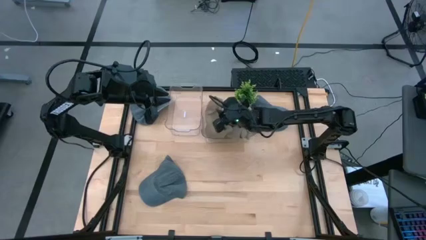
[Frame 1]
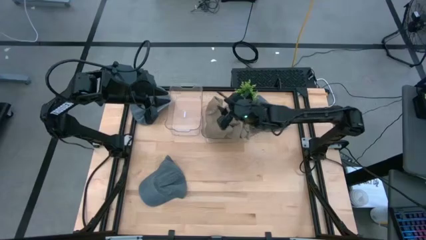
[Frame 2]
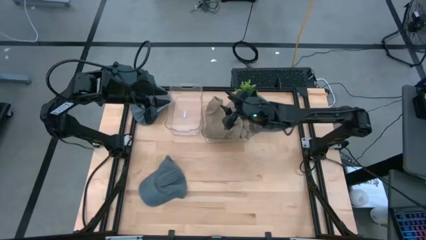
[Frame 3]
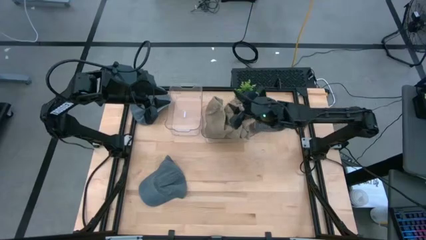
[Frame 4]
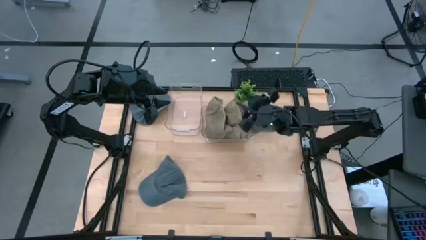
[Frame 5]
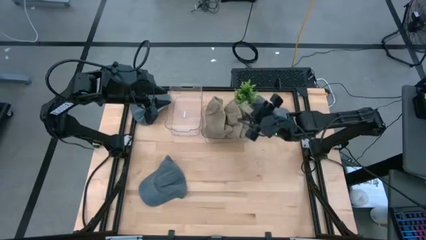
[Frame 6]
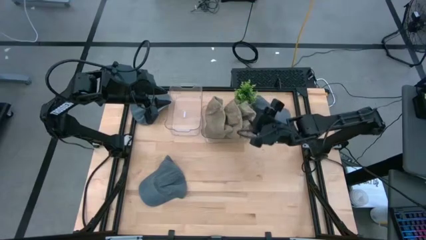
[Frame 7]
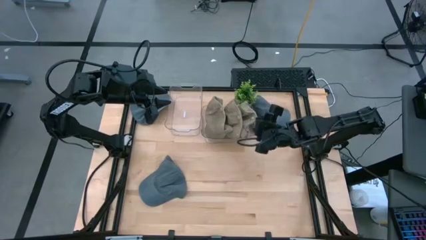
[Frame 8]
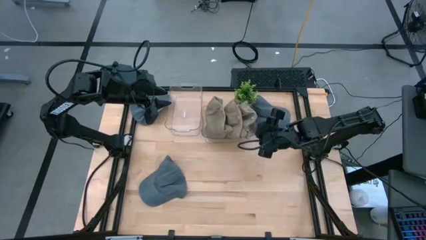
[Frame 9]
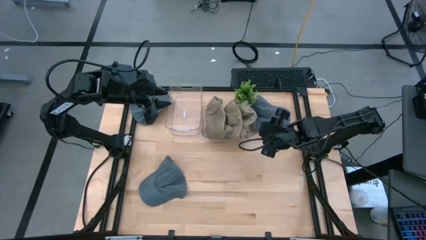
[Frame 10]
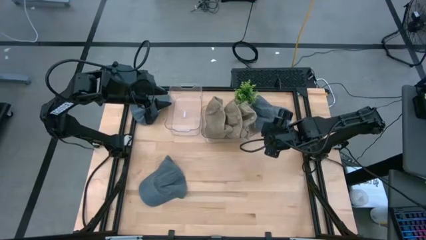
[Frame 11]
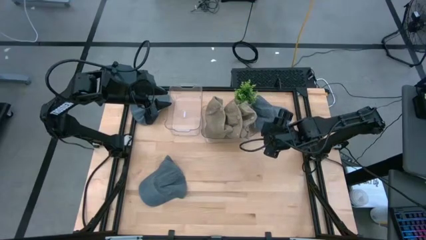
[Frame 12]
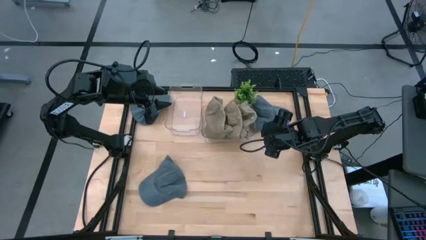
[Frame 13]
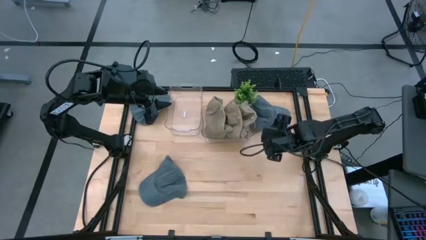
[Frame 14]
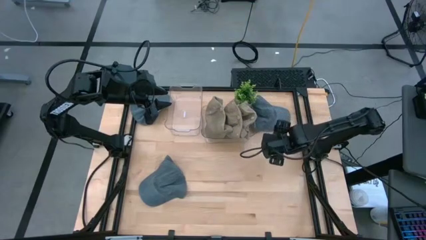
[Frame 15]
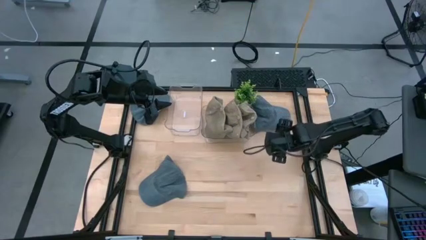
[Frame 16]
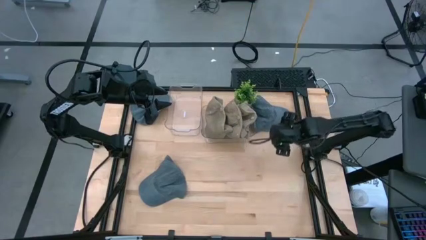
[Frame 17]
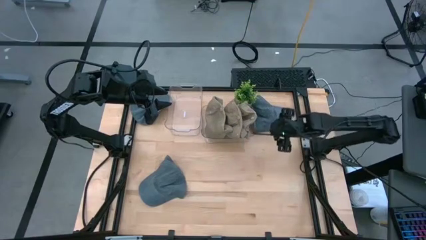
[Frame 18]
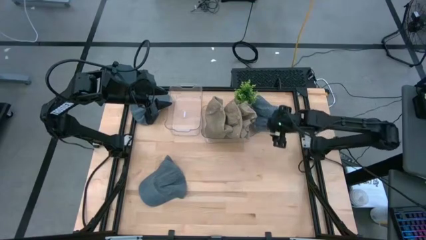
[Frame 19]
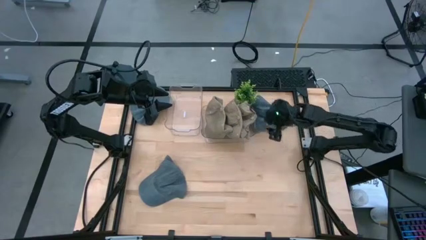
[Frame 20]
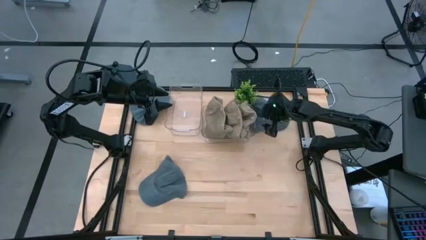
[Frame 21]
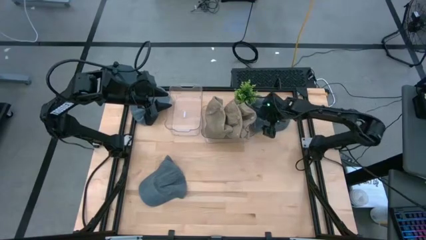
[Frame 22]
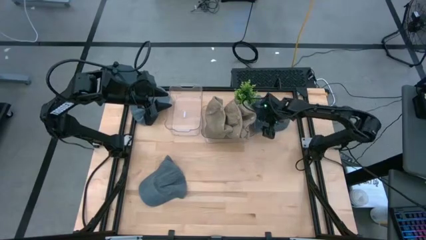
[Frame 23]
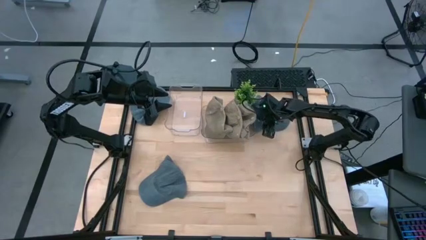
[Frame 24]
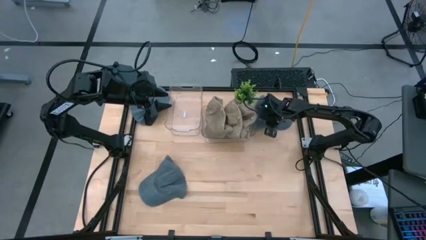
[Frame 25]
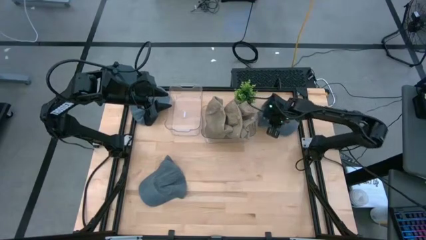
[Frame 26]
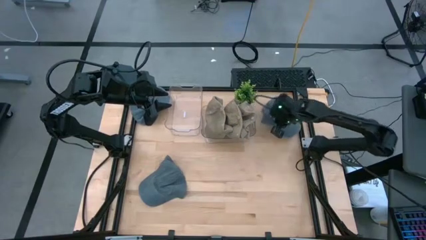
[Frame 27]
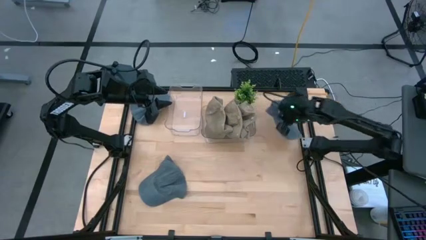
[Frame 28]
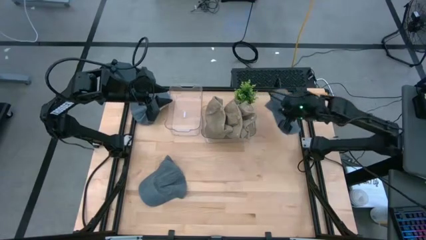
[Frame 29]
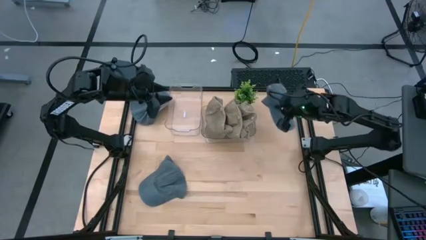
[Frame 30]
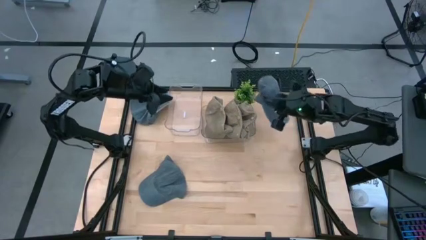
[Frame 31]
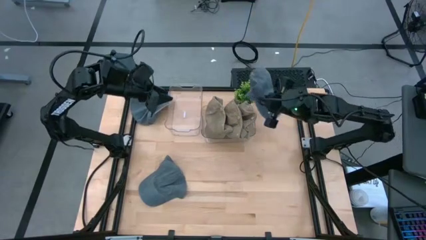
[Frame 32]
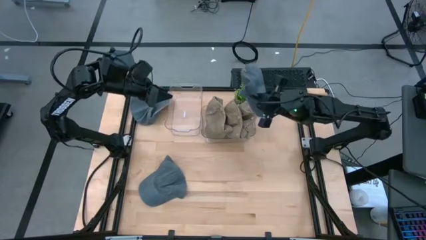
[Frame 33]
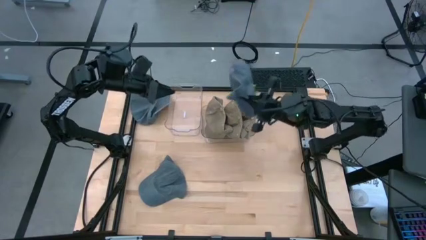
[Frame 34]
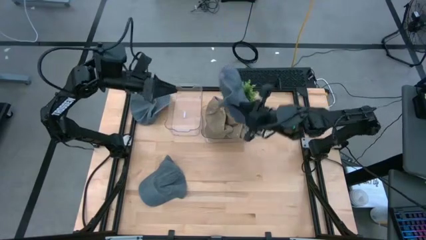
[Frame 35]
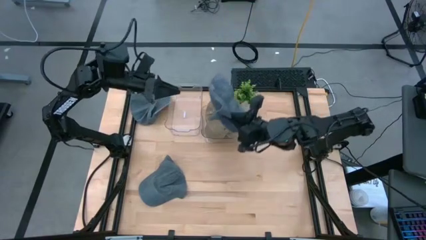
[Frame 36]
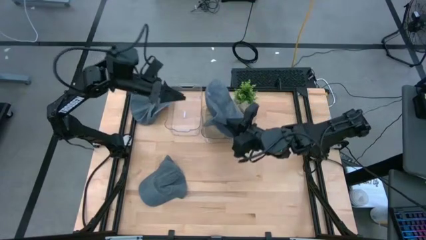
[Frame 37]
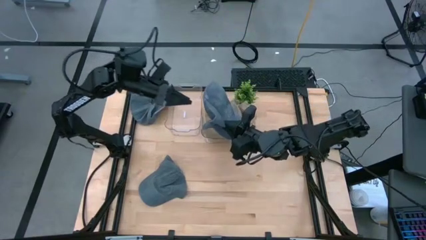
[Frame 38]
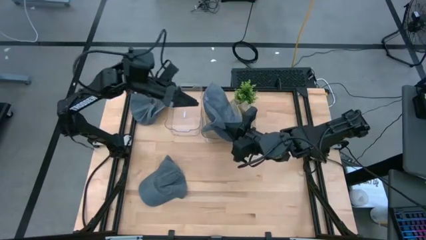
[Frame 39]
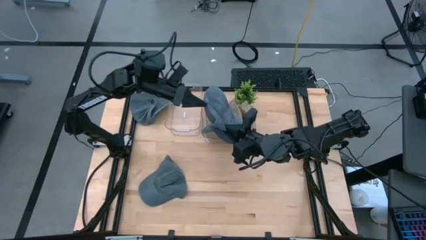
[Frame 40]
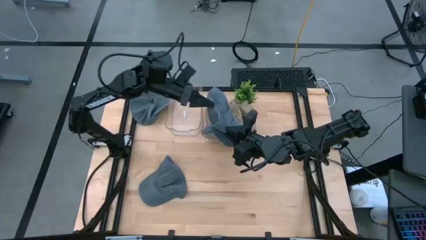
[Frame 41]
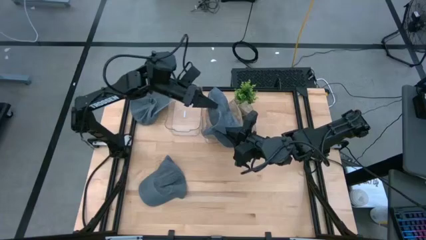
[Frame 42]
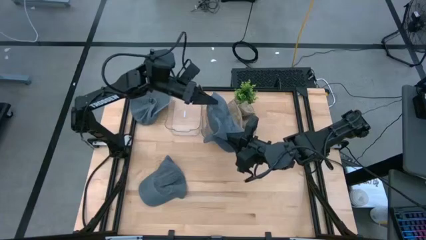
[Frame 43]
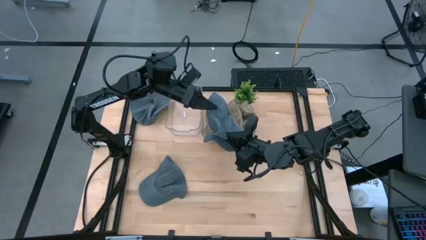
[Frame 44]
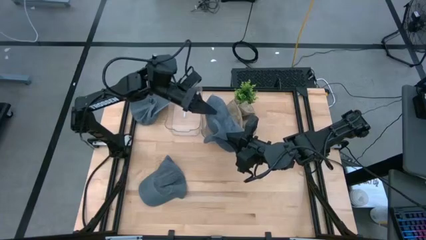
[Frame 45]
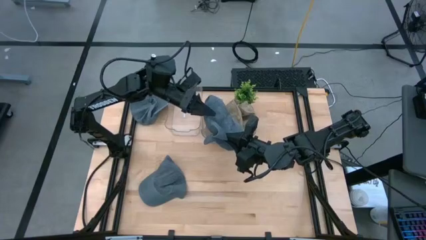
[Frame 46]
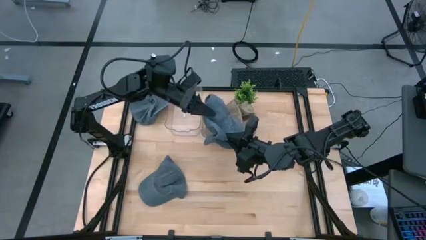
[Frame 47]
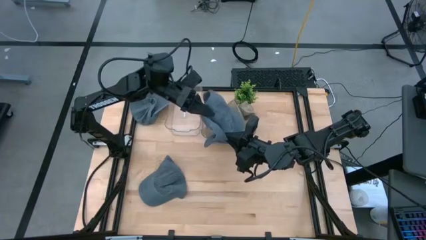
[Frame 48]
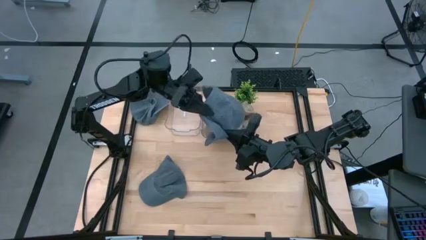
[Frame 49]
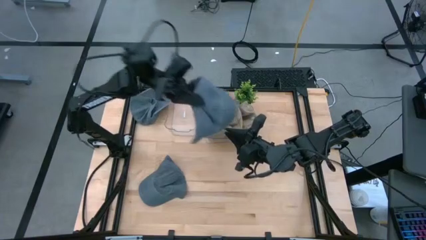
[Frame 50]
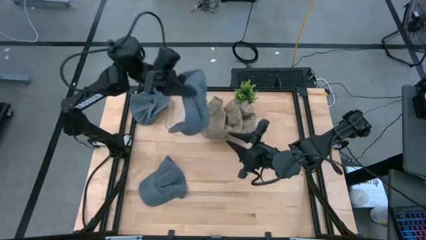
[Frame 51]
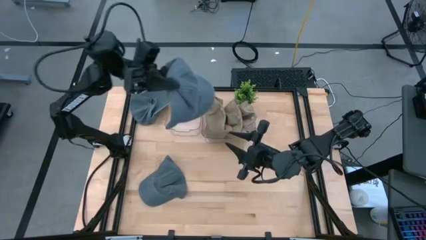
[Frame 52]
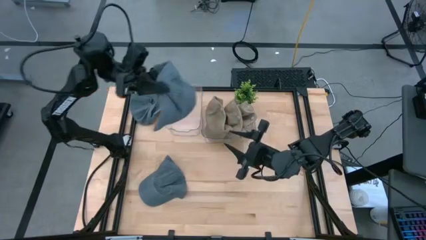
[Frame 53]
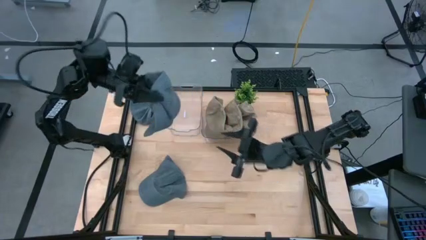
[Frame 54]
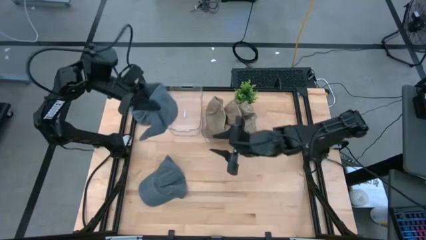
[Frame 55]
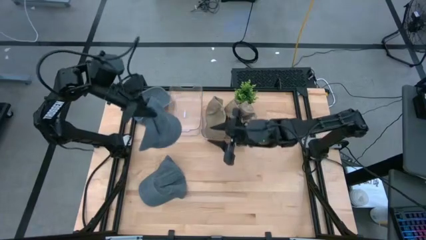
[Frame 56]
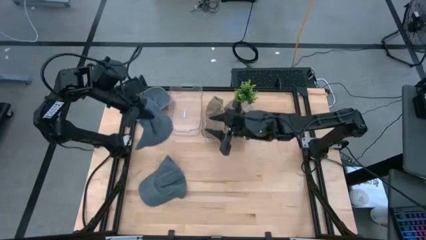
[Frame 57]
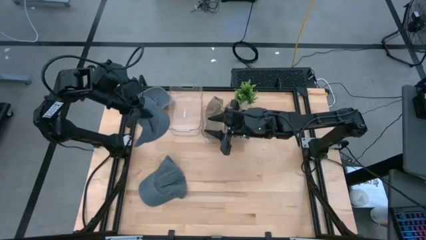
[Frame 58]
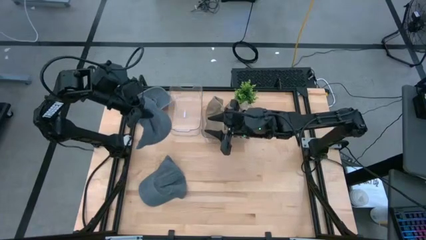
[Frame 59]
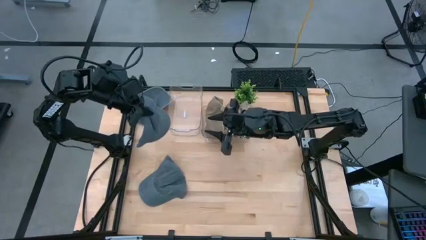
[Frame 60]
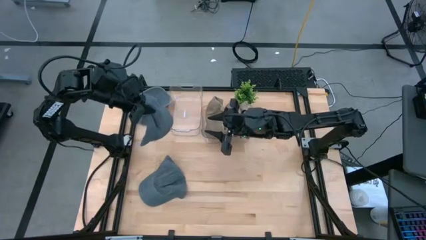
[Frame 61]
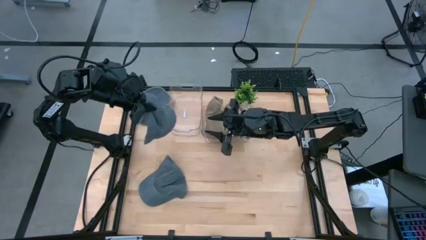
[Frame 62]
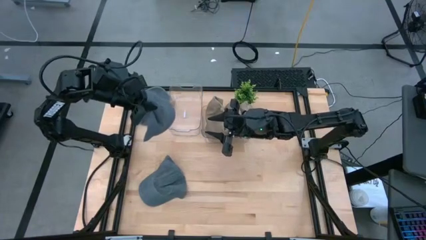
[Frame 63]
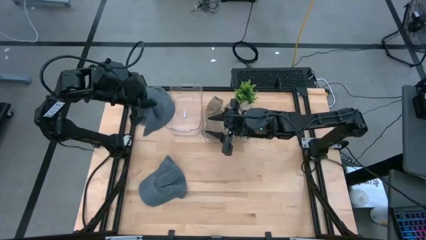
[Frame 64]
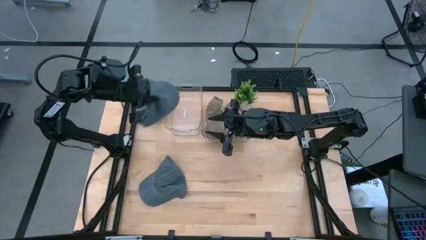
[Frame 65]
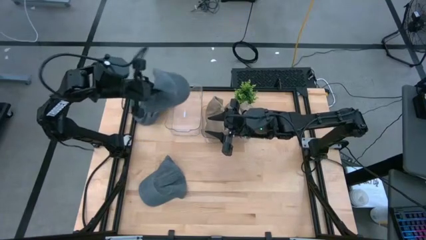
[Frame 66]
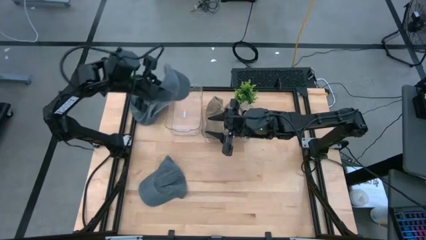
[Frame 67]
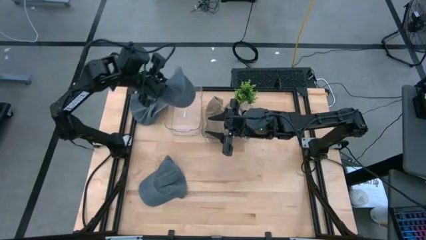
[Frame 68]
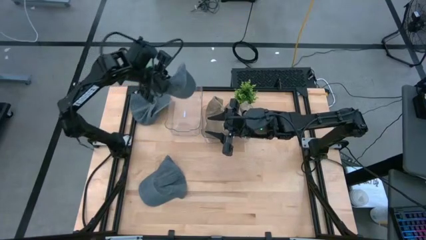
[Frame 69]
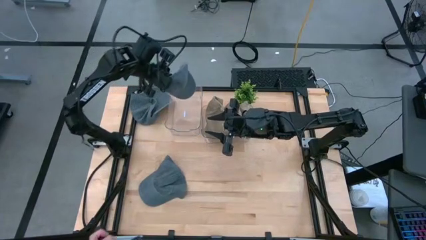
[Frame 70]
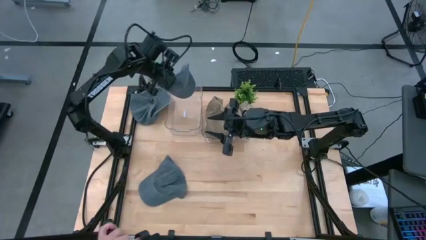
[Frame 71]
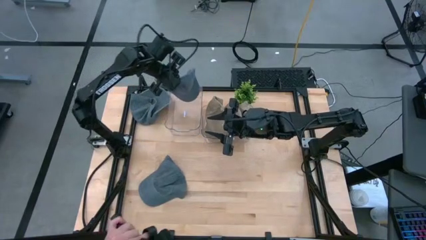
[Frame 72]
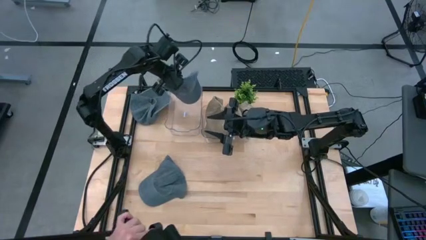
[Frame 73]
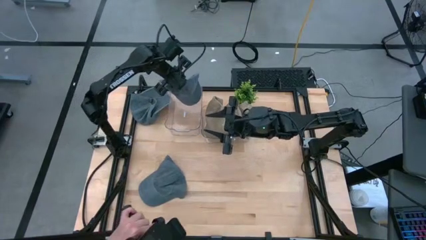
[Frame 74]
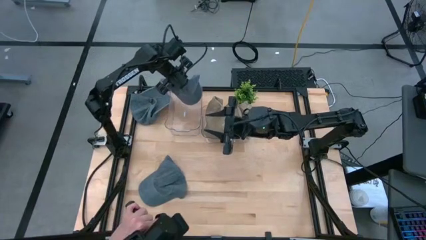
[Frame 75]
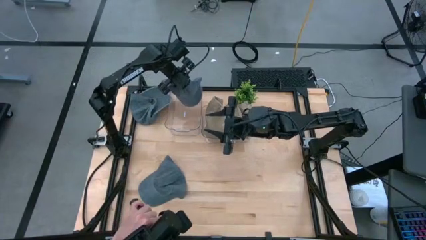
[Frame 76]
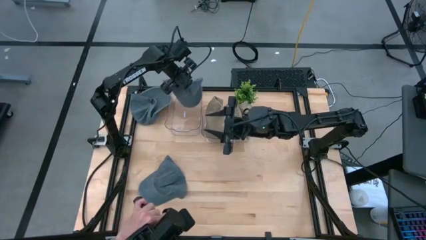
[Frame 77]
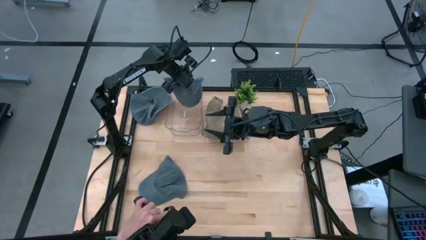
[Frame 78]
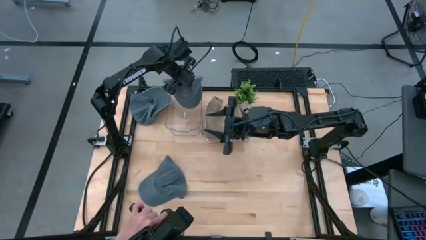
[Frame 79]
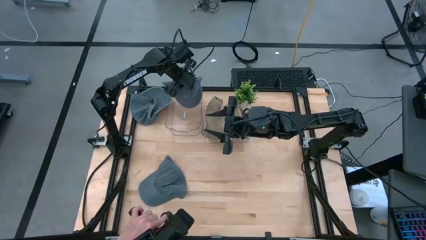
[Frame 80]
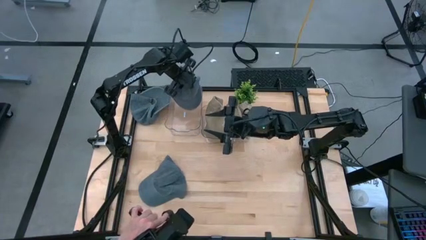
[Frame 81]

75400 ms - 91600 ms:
Task: Pick & Place hat
Put the top right blue cap into the left transparent bin
